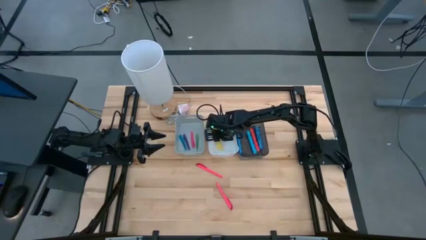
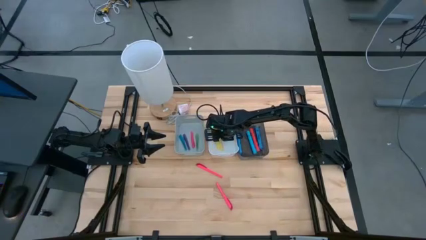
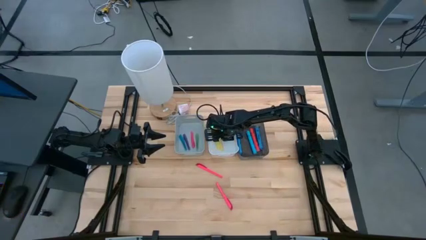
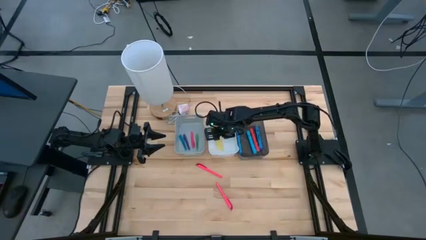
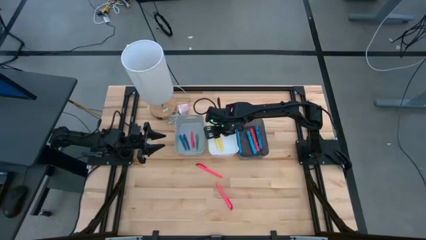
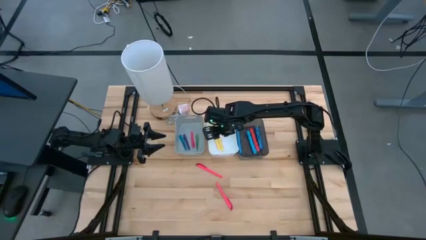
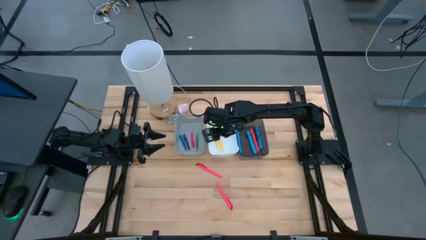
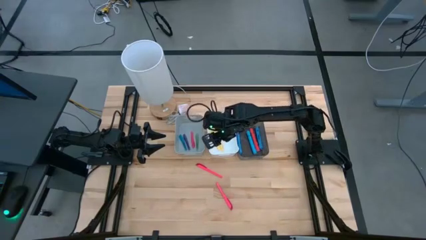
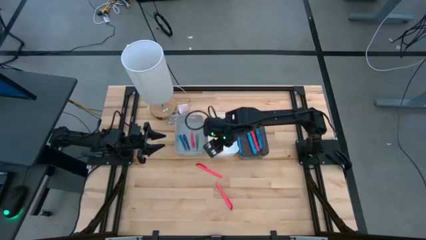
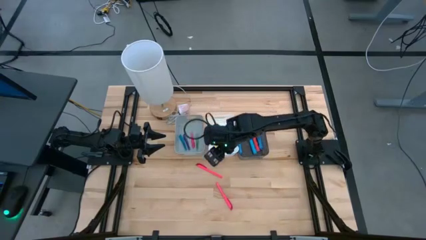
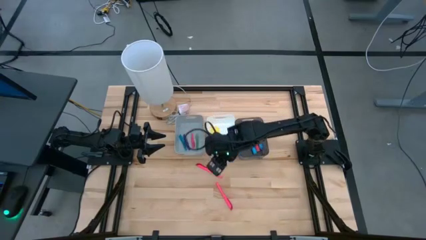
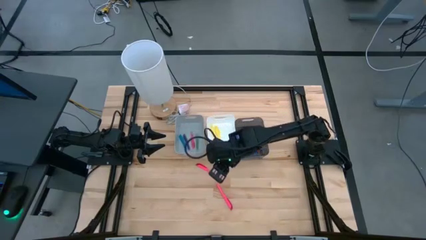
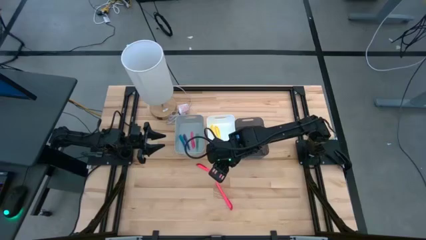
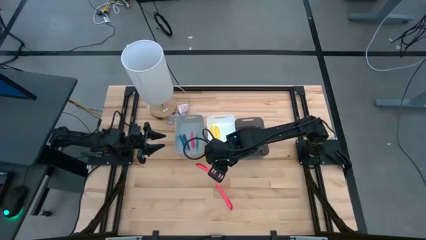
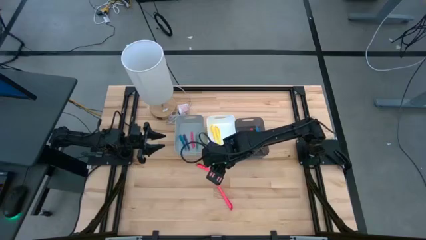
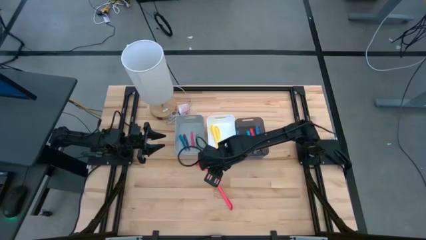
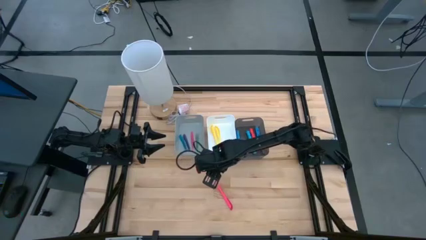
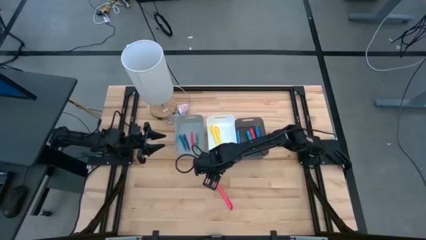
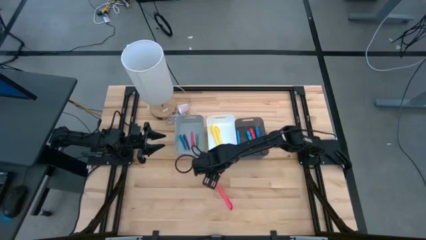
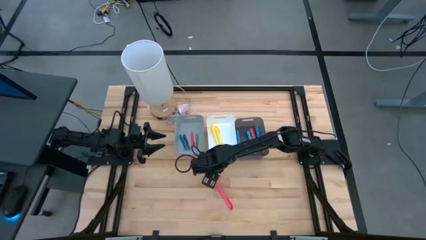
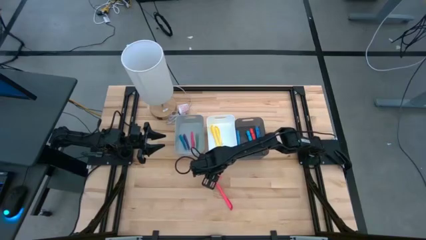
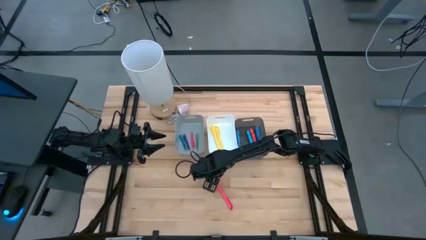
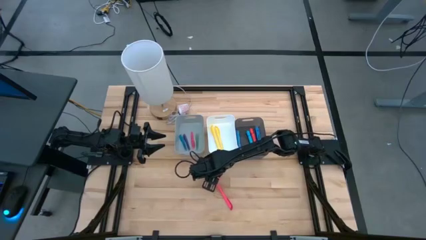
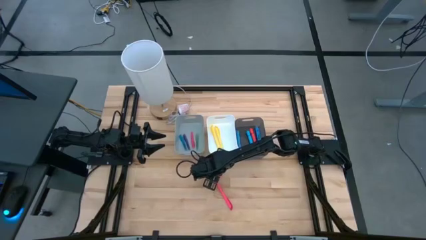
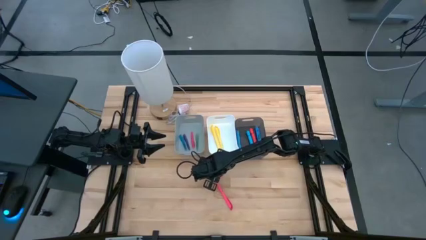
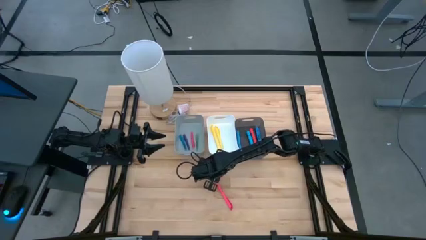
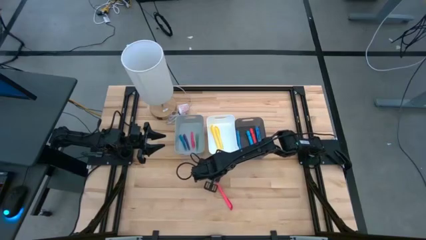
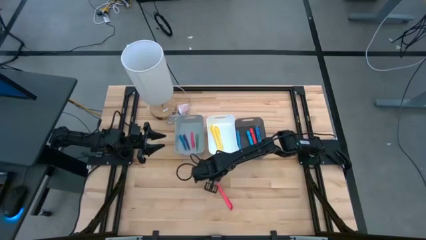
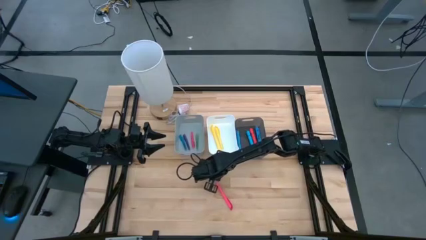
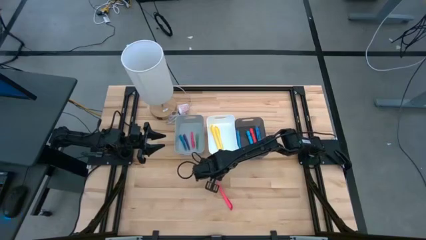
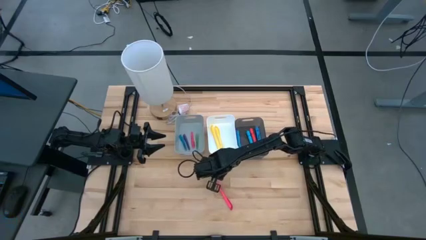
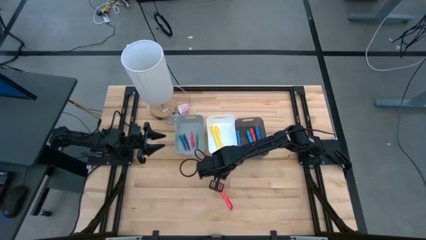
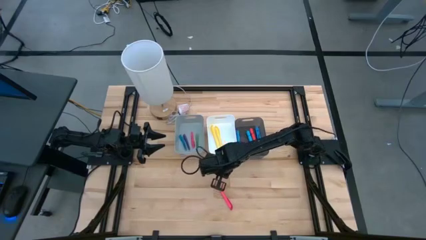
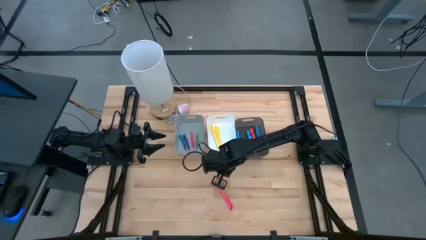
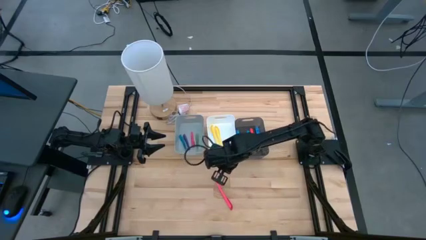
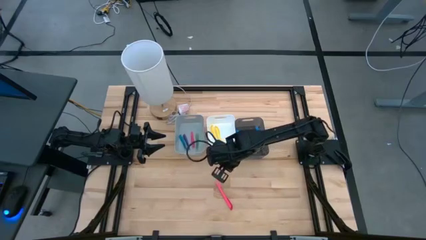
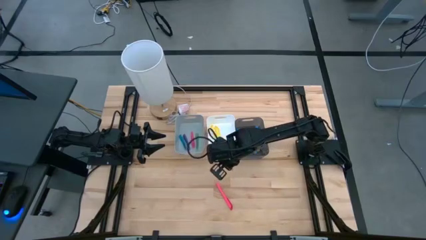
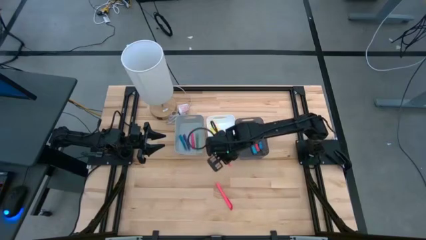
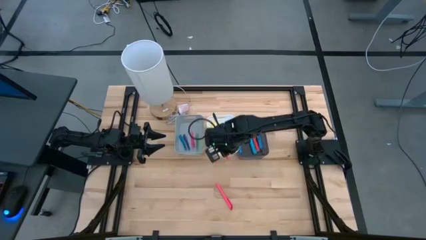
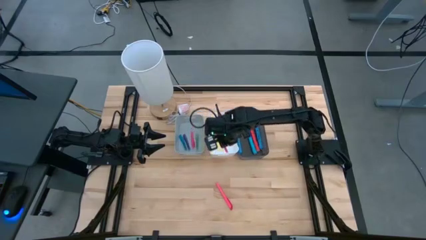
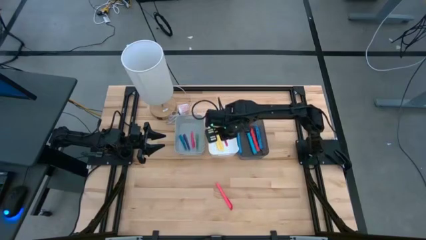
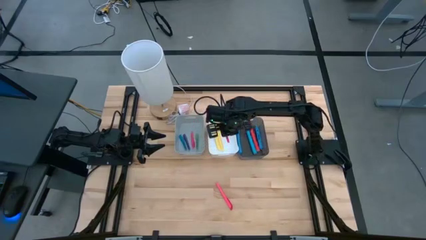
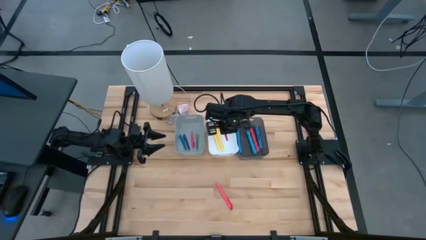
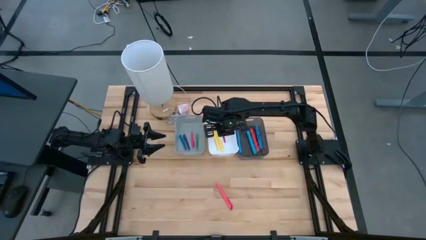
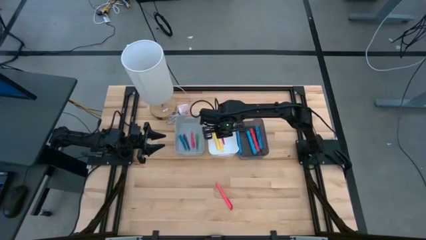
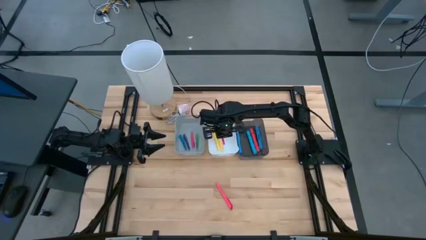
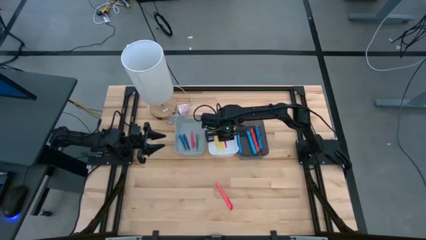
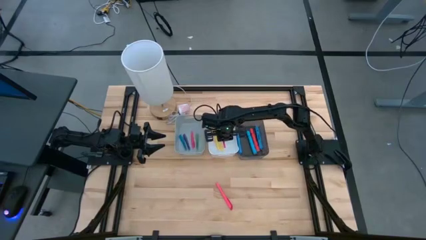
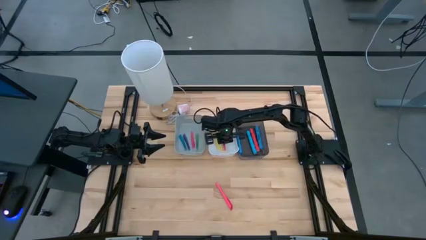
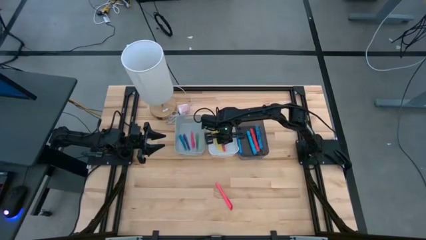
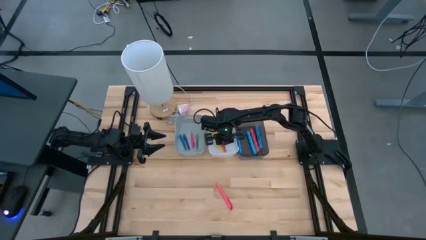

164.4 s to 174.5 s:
Task: Pick & Place Markers
Put the top pink highlighter pen into the white bin

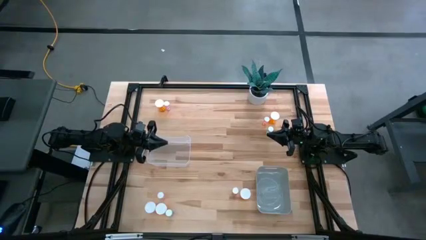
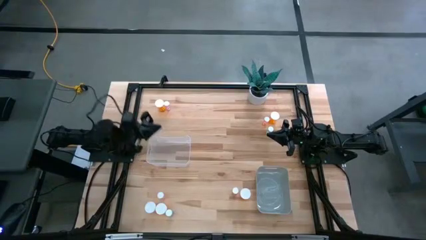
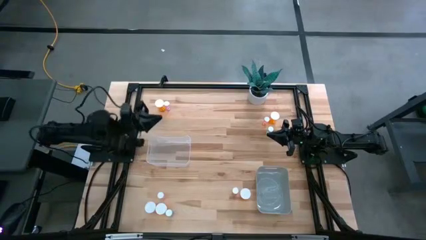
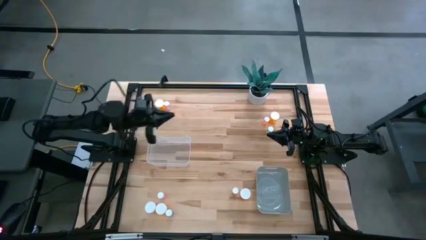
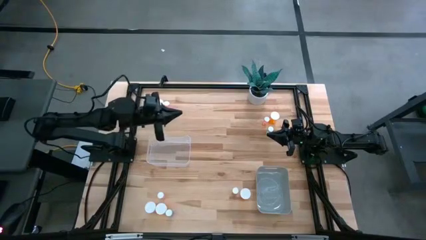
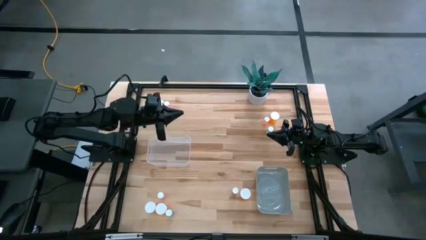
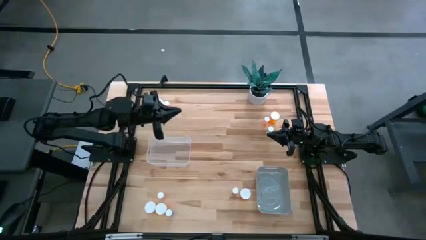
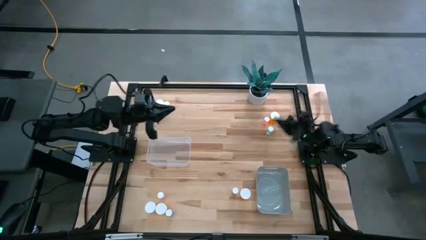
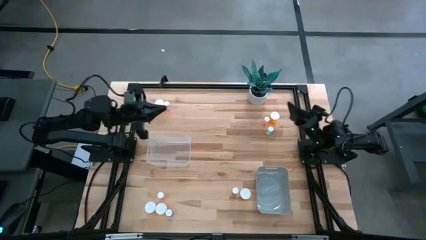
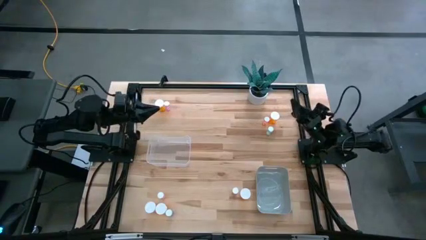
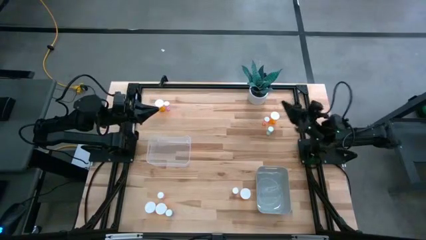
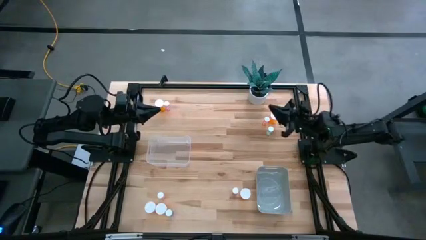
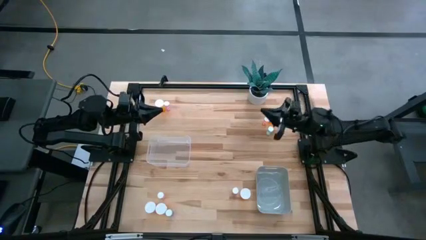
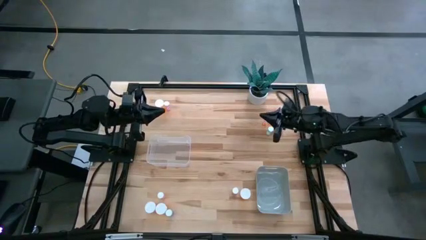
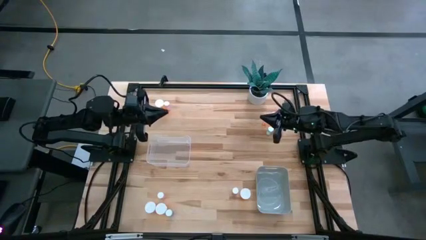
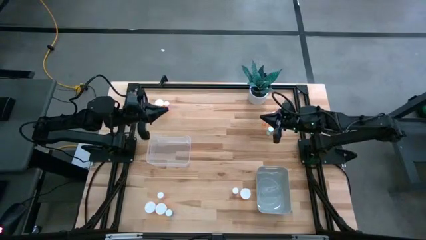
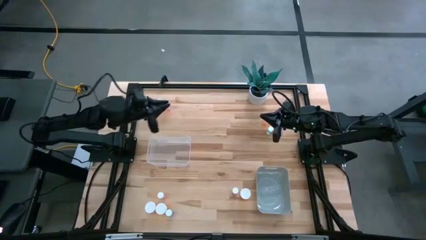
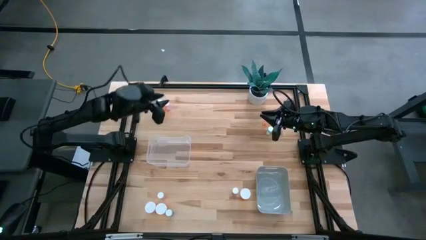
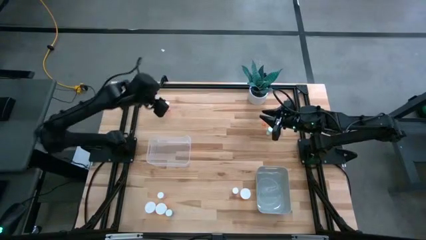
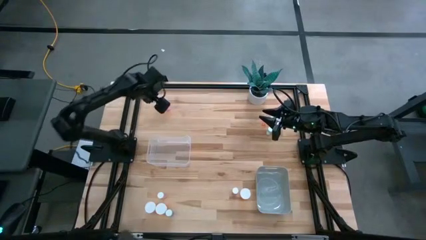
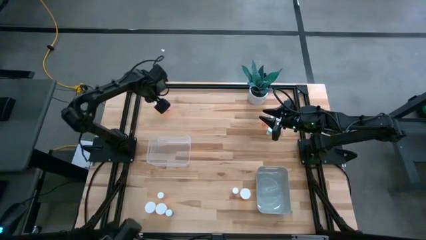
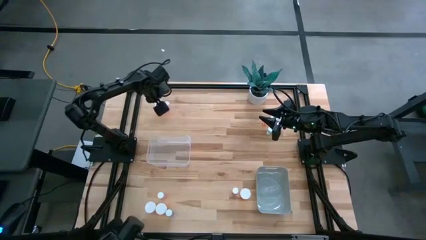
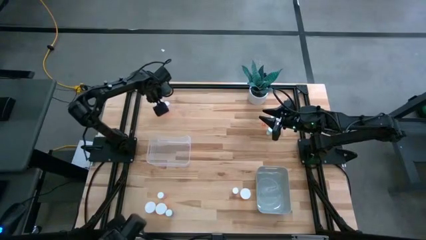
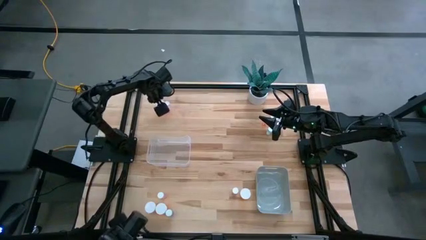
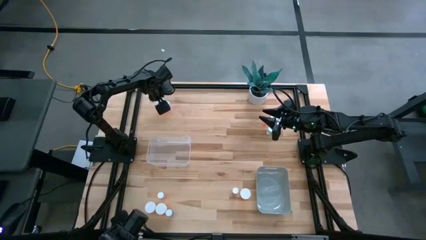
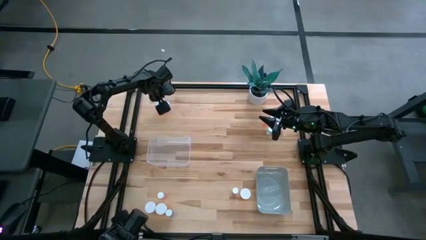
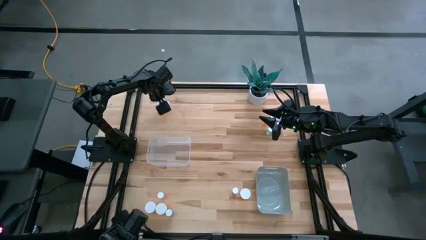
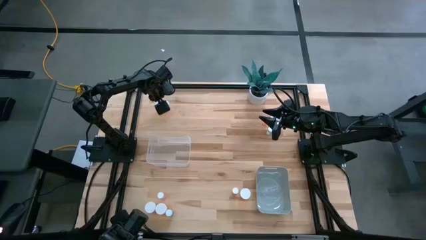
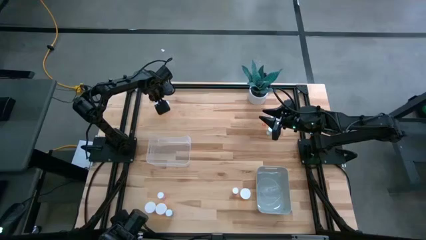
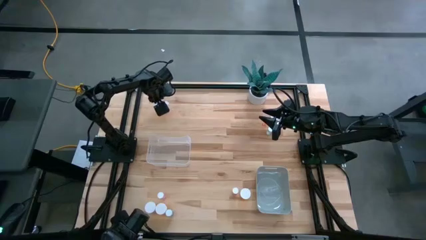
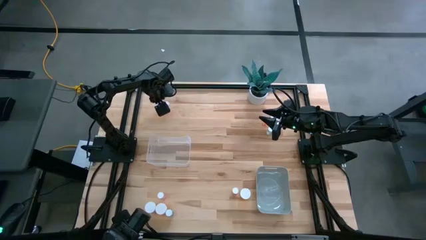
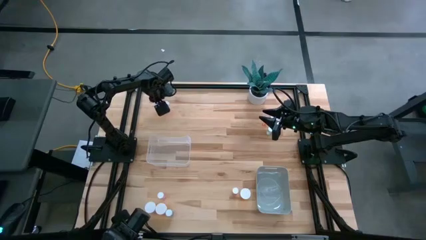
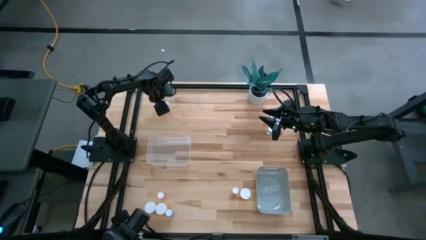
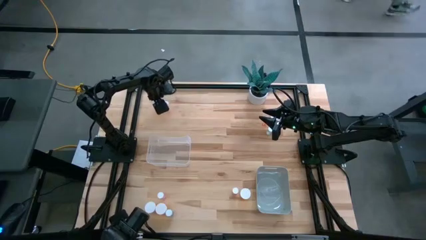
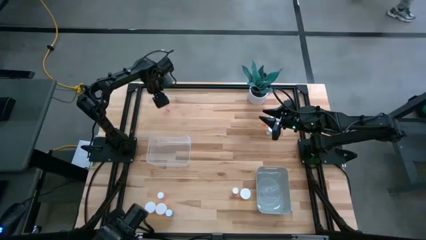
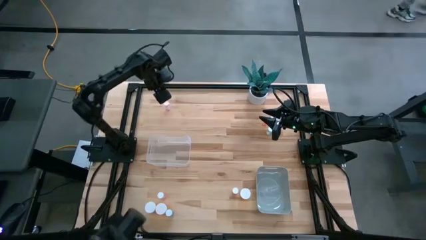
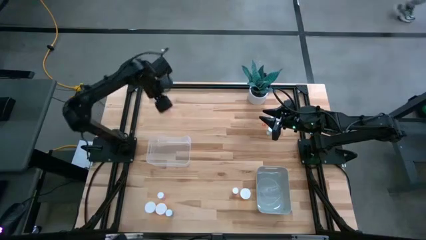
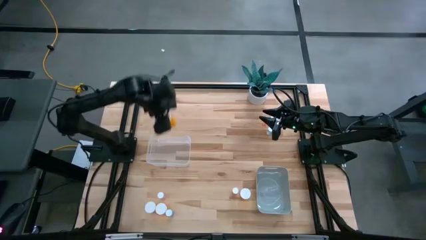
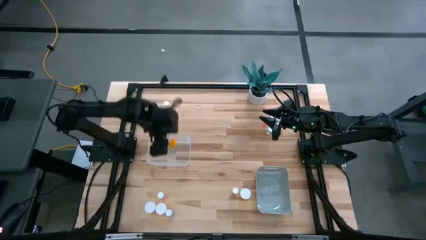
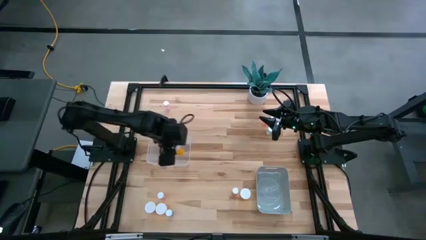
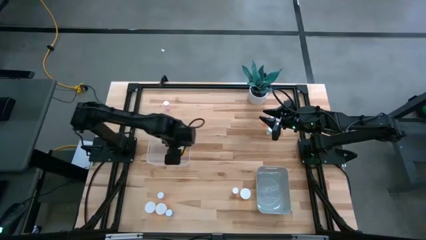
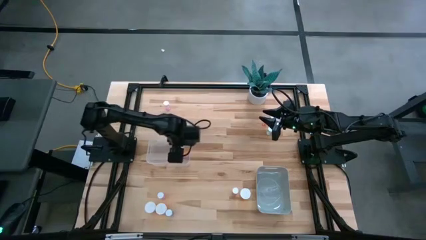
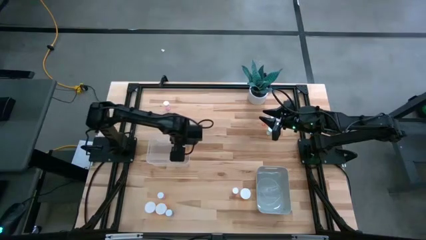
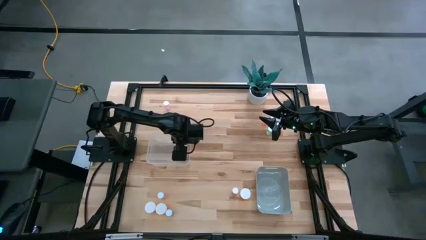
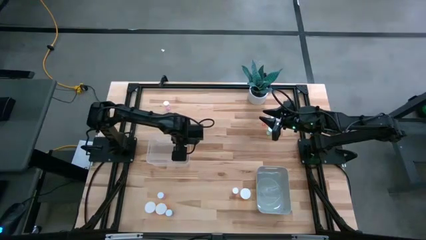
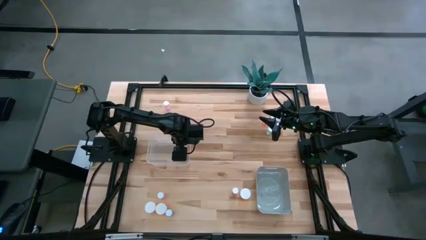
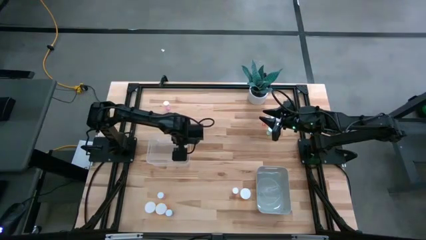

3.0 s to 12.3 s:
Task: Pick and place medicine bottles into bin by pill shape (circle, oval)
Put the large orange pill bottle into the transparent bin
